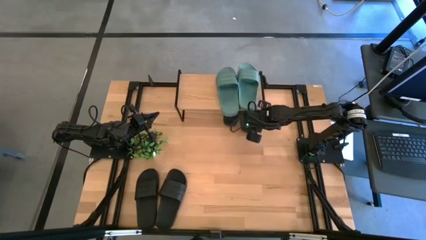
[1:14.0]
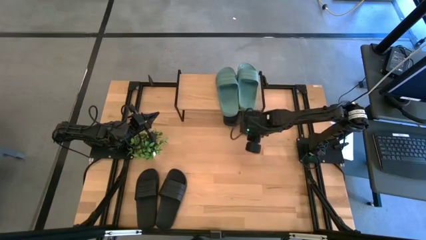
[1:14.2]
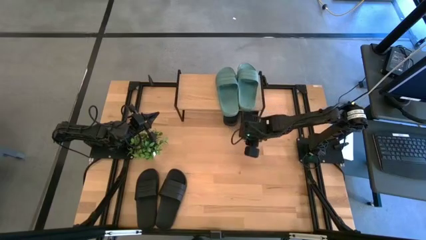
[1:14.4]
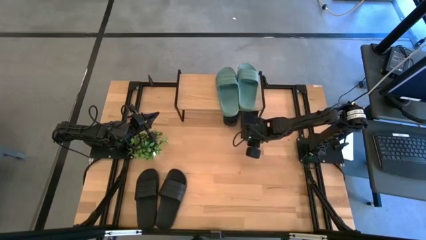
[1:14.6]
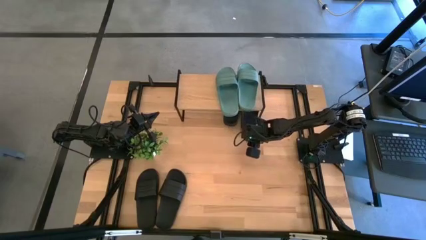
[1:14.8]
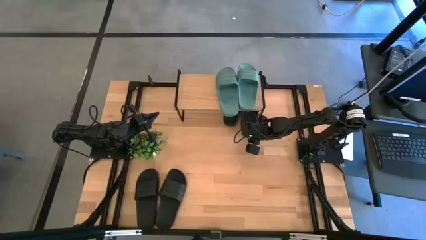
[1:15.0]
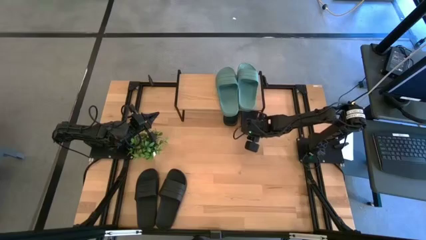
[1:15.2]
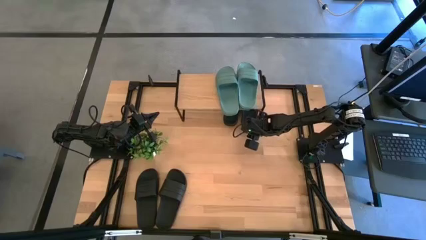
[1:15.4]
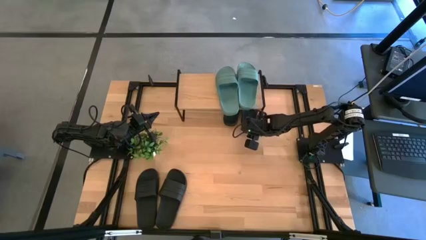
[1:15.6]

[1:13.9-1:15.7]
Task: Pick and place slides into the shelf
Adjust the black slide under the shelf

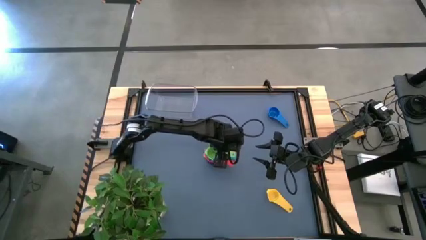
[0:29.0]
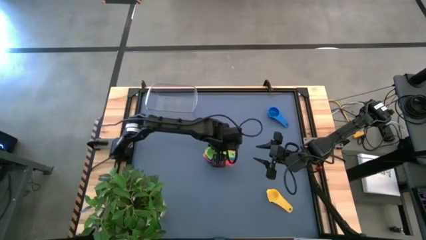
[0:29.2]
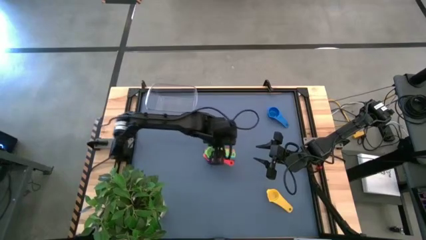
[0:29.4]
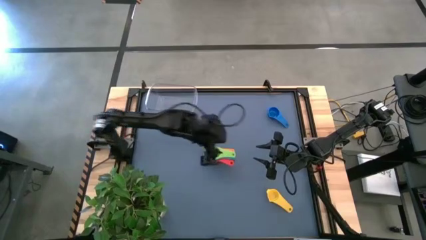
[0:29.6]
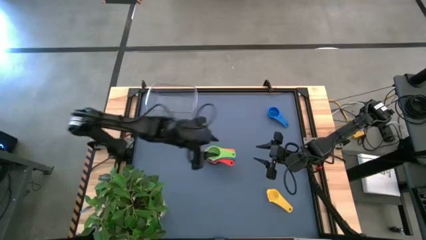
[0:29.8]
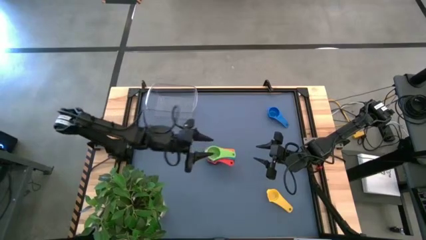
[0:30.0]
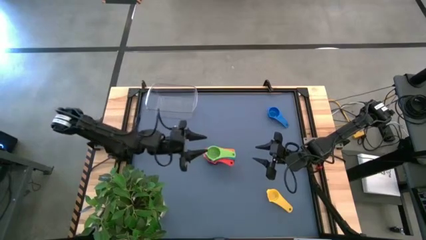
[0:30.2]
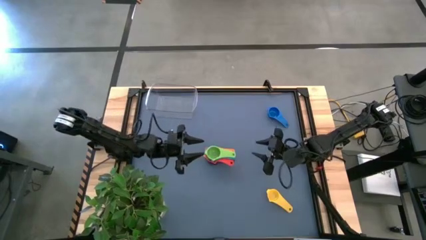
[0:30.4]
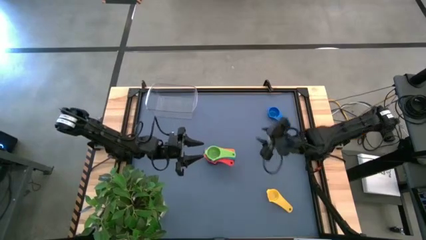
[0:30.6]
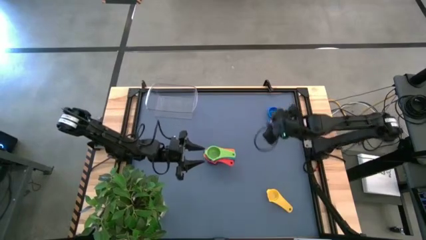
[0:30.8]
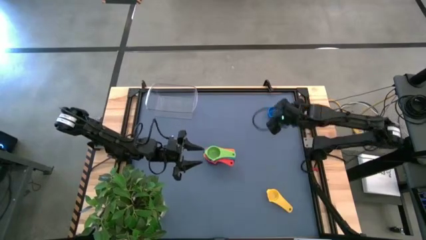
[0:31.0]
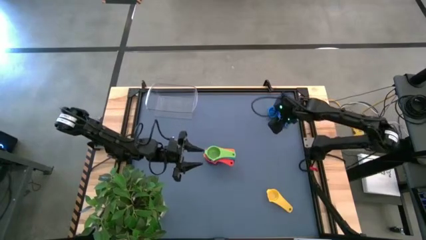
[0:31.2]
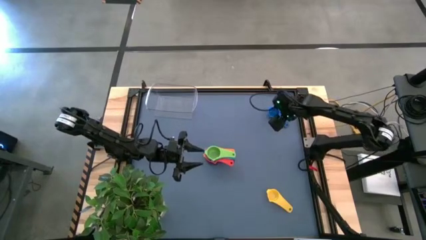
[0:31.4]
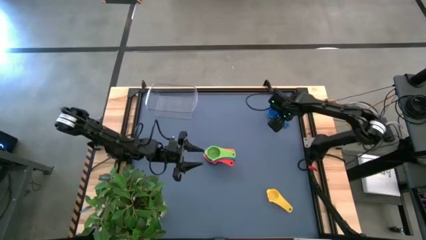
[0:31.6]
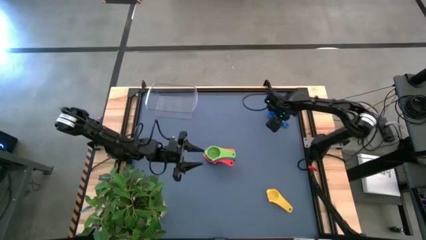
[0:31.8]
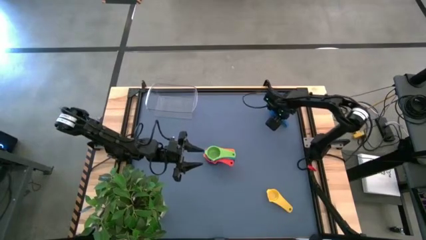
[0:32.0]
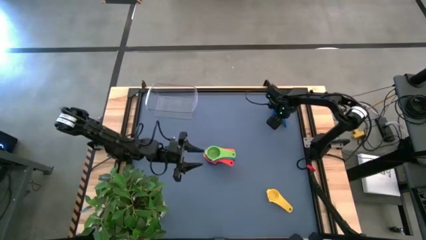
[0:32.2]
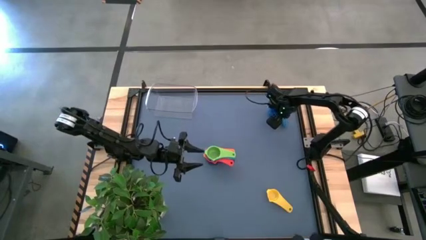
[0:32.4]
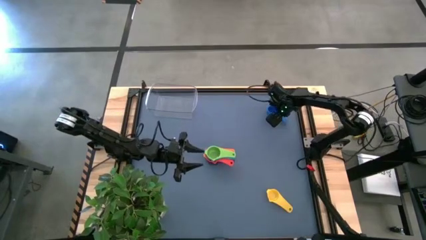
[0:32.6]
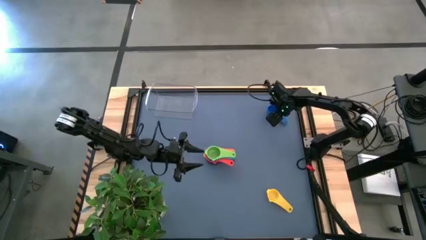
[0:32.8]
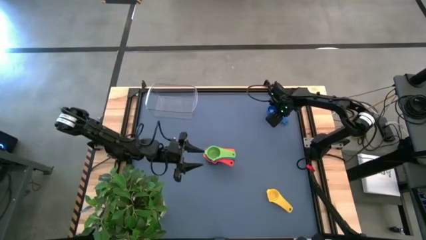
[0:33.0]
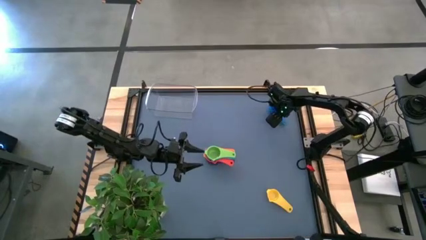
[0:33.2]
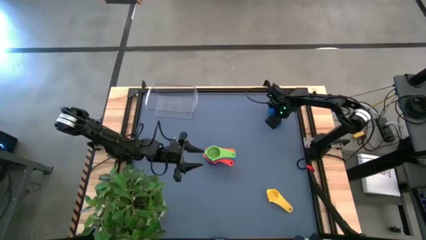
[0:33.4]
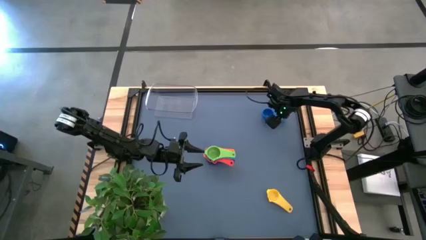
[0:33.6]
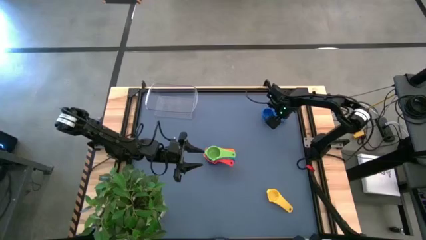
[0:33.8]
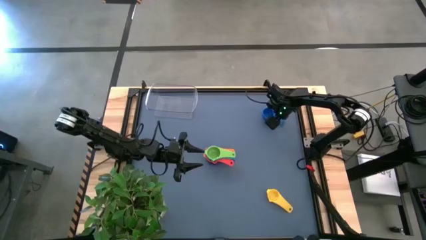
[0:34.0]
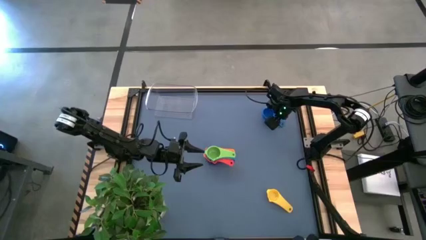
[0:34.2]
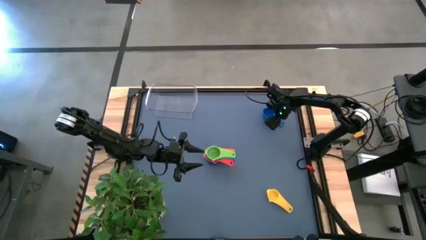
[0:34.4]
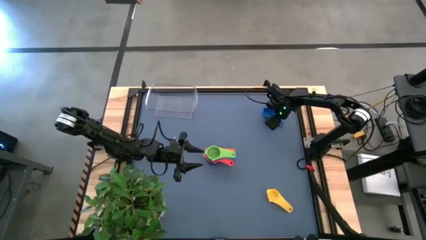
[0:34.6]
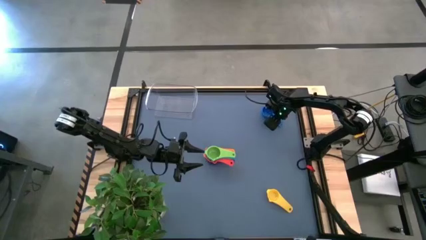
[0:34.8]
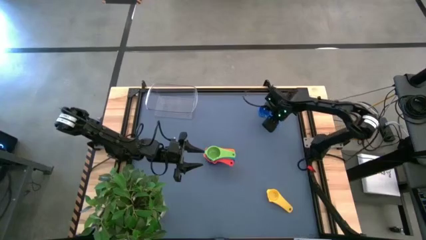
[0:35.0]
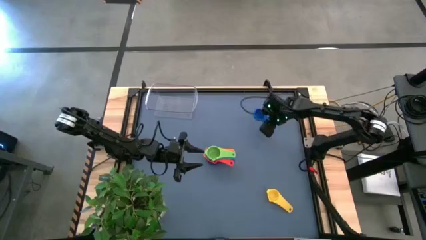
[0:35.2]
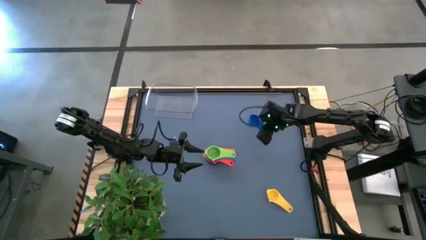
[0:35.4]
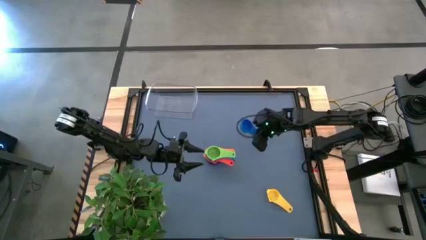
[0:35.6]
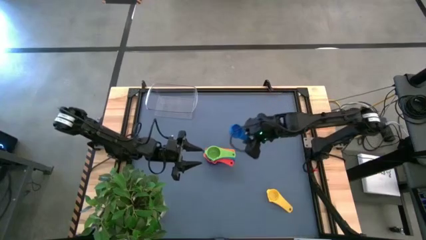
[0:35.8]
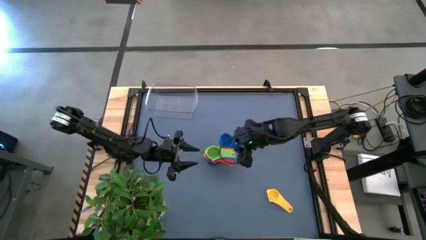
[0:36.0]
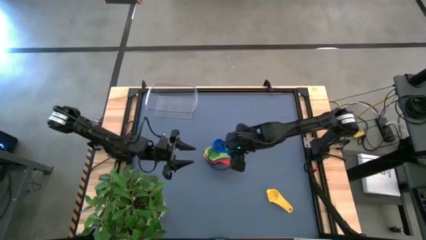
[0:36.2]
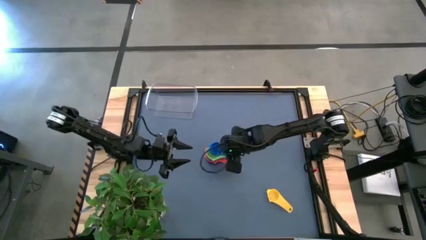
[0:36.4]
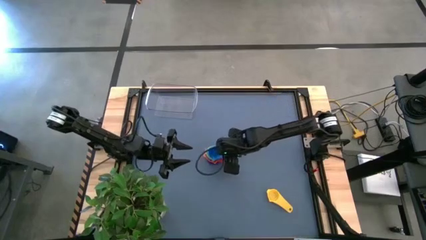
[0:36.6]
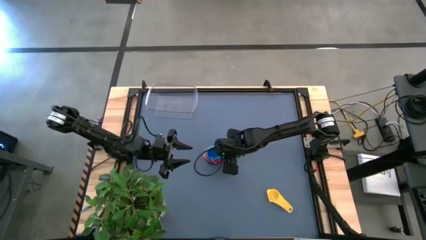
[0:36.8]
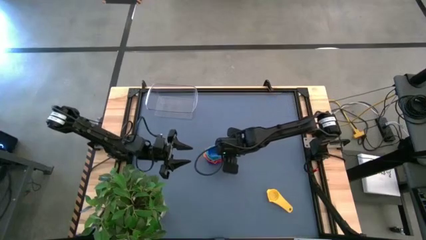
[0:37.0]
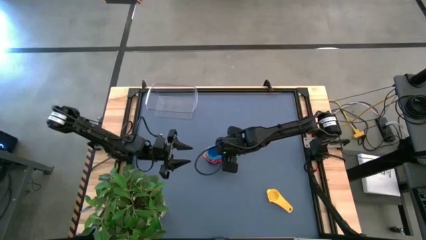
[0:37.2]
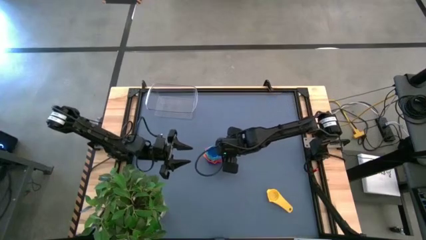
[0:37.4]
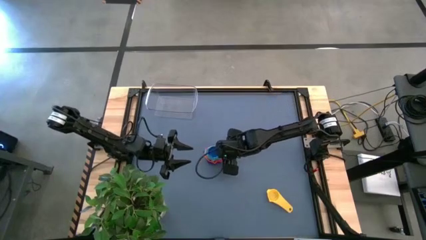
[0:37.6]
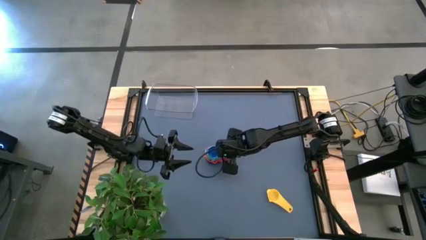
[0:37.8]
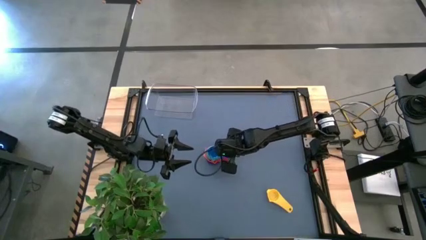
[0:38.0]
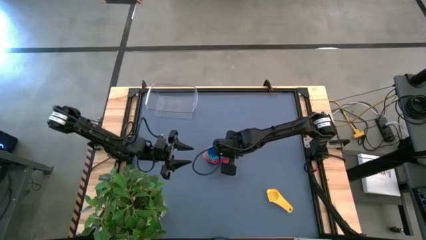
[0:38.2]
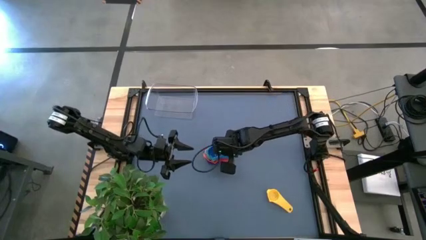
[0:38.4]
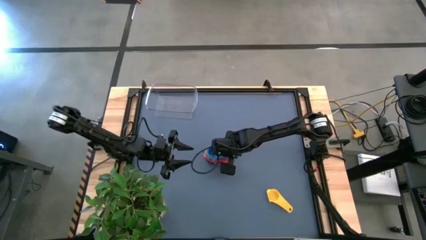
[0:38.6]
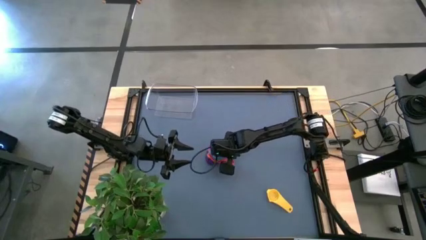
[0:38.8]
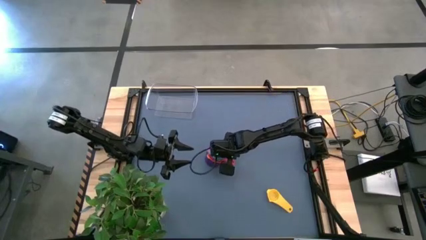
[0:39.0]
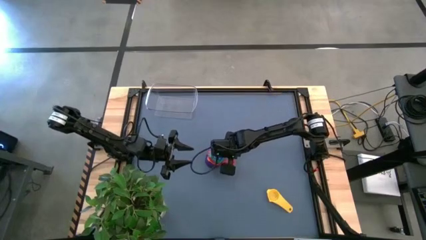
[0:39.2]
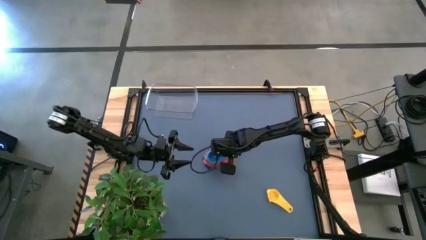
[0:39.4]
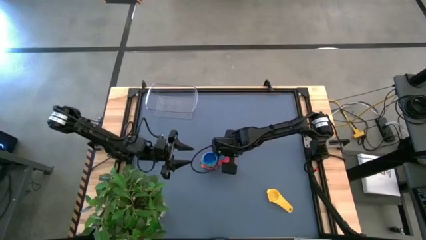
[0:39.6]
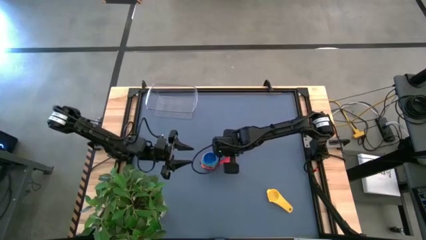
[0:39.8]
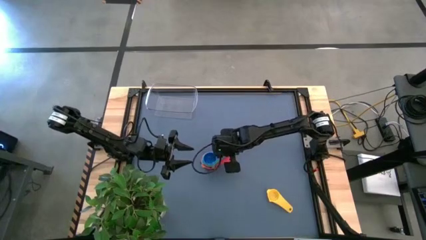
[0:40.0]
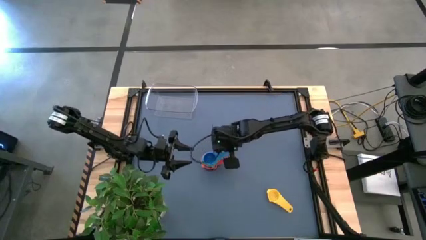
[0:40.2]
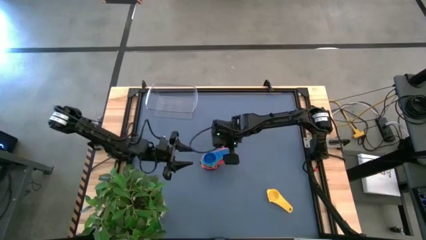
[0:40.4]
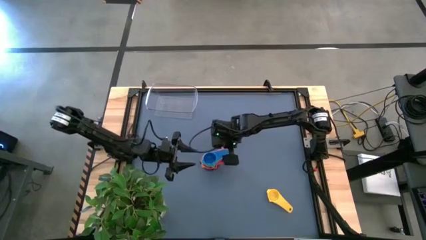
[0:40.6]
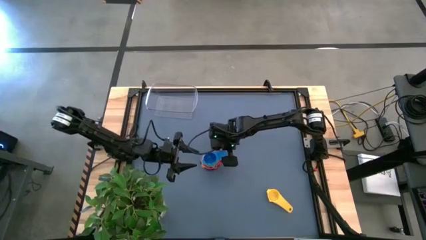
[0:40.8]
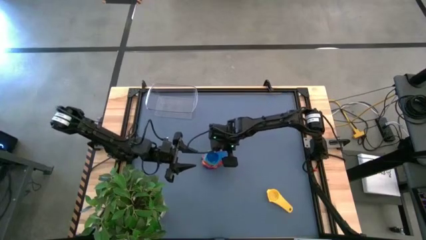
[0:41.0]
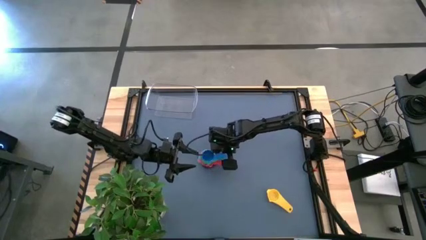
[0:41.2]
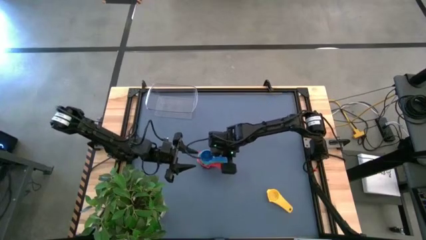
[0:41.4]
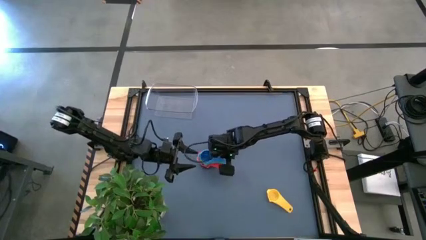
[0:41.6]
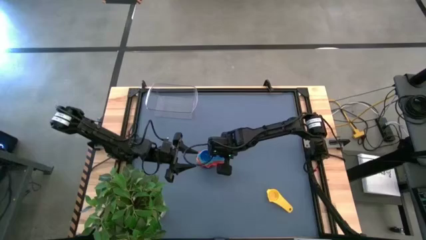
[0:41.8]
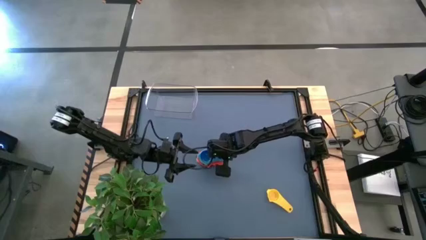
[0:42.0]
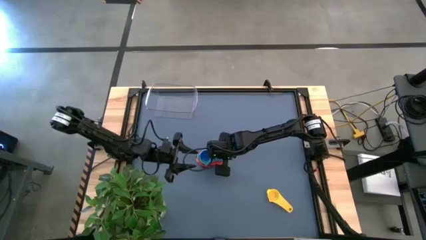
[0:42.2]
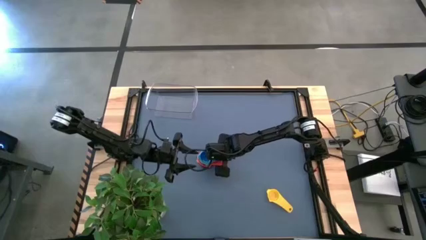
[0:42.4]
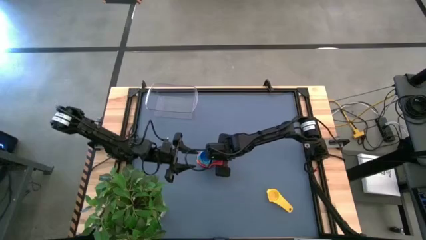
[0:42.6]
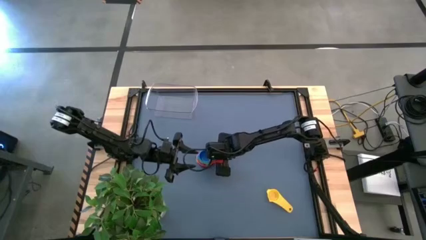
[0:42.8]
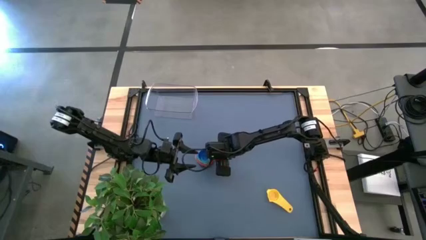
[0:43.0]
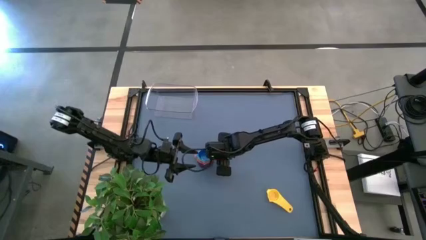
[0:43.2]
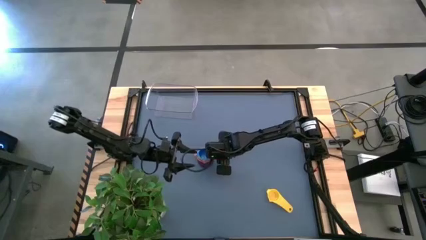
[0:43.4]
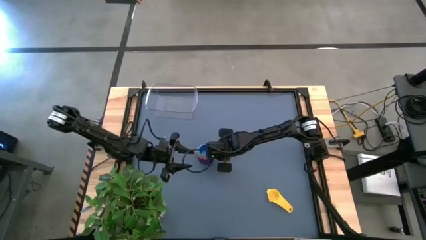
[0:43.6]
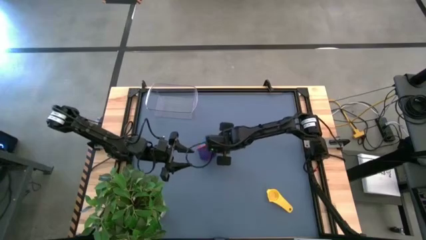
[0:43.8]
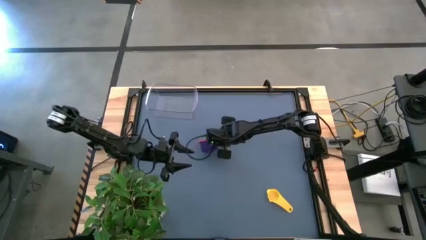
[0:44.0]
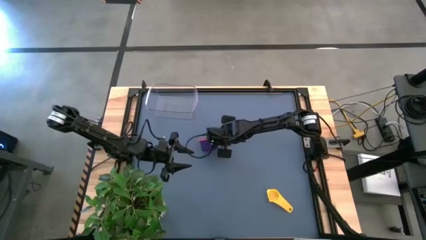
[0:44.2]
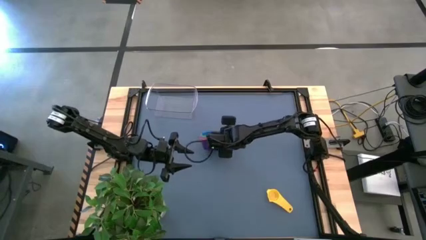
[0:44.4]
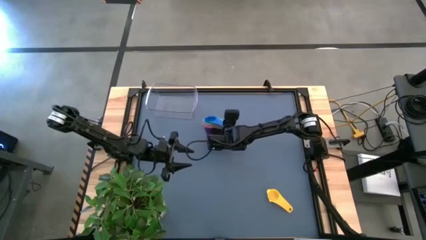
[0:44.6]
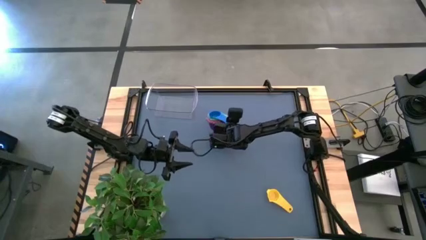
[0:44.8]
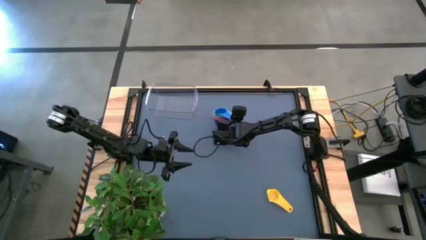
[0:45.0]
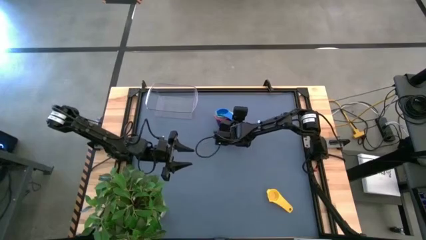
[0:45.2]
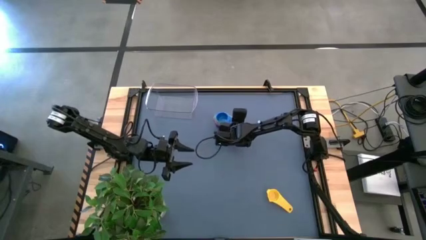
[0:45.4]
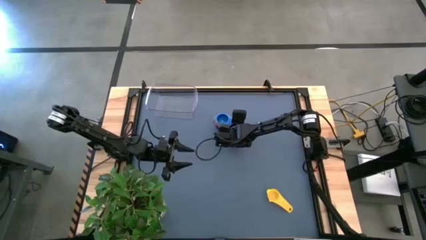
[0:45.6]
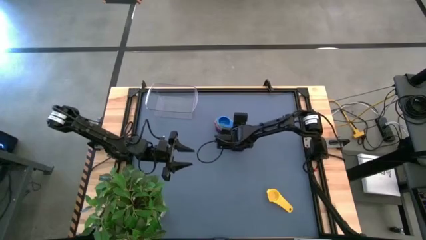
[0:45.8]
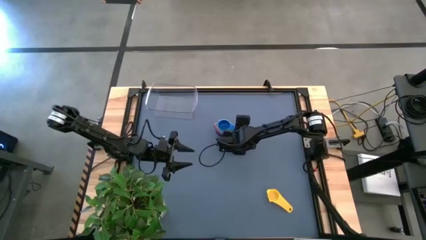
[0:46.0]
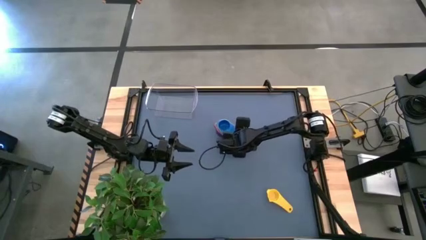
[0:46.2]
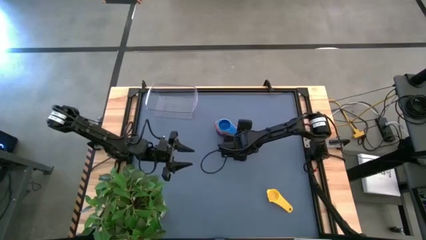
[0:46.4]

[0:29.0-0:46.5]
Task: Nest measuring cups in basket
Stack the blue measuring cup on top of the green measuring cup
